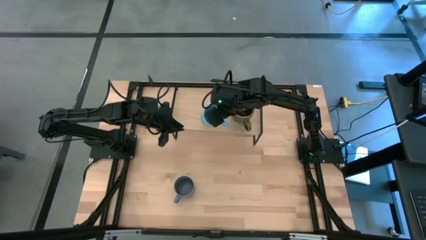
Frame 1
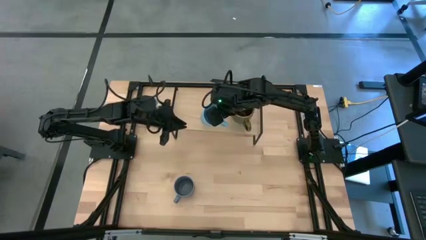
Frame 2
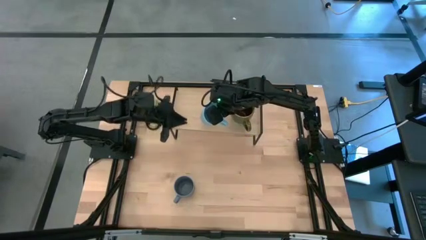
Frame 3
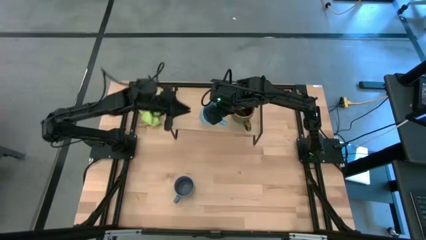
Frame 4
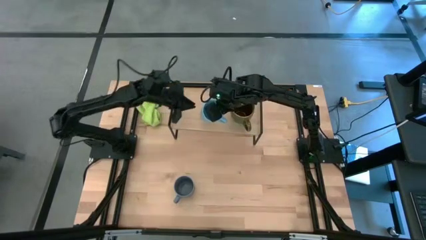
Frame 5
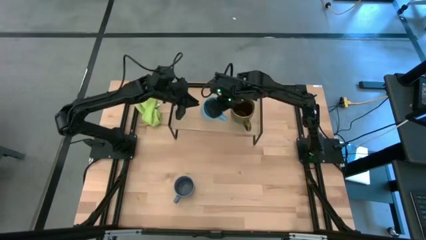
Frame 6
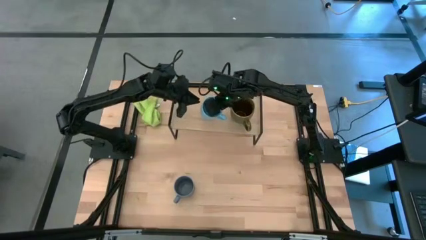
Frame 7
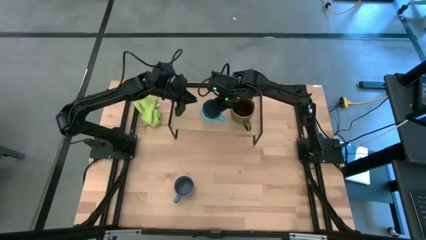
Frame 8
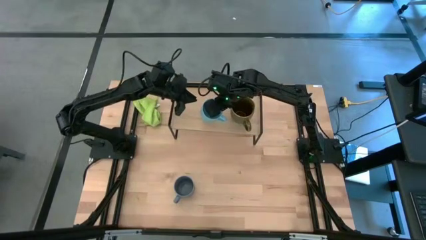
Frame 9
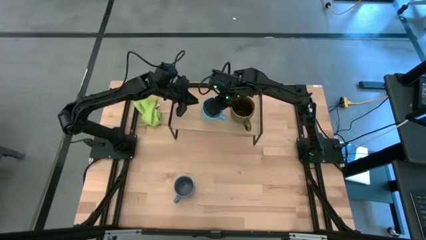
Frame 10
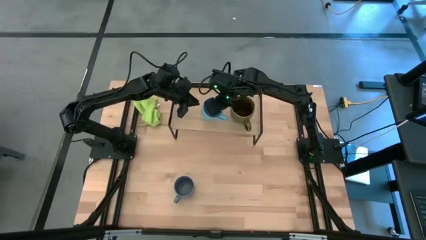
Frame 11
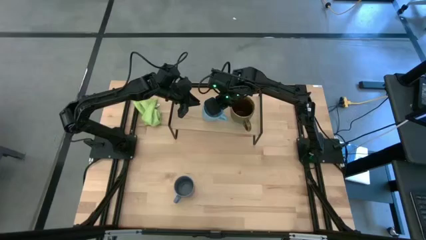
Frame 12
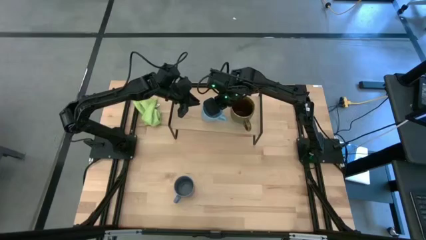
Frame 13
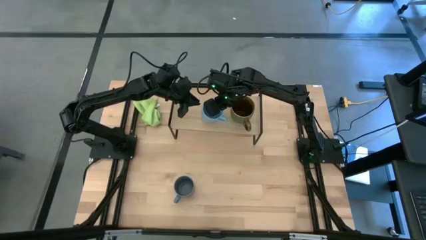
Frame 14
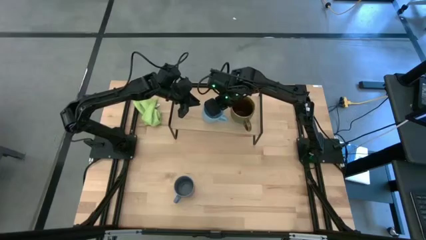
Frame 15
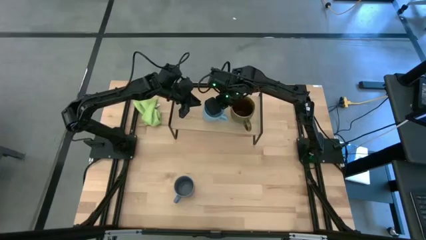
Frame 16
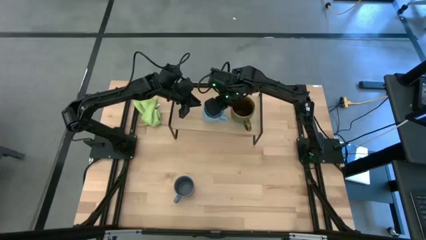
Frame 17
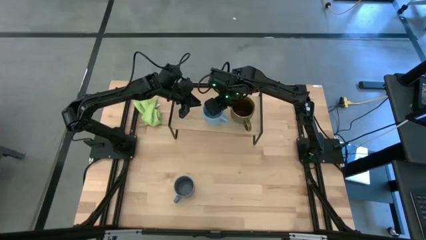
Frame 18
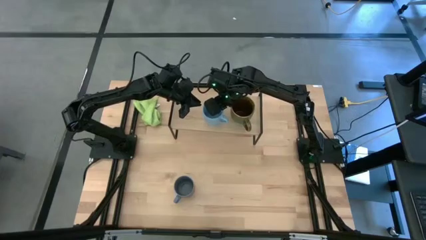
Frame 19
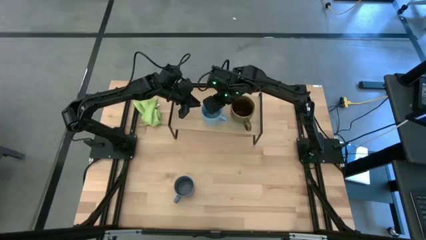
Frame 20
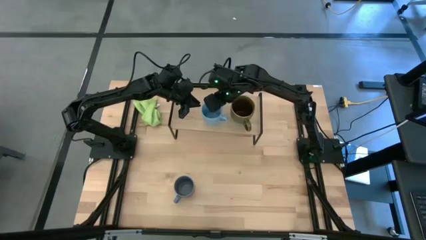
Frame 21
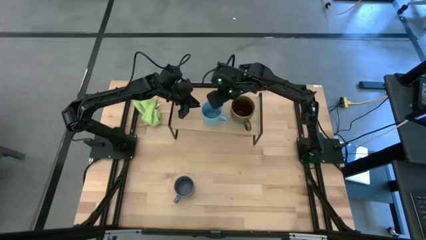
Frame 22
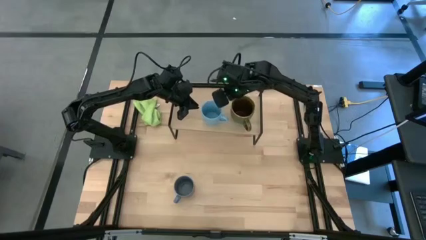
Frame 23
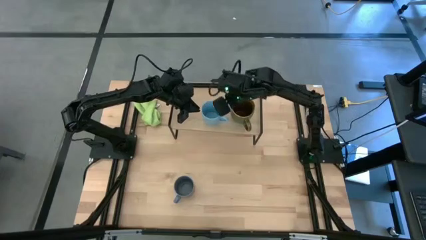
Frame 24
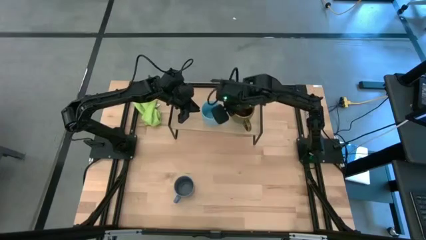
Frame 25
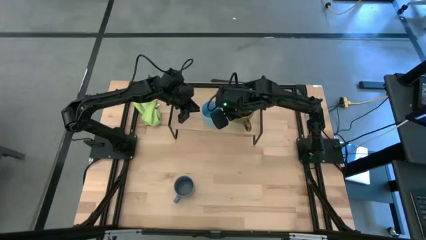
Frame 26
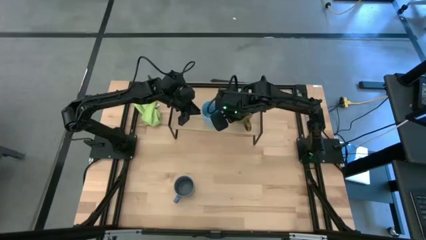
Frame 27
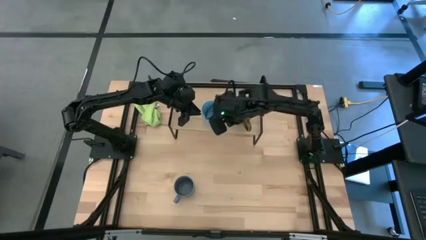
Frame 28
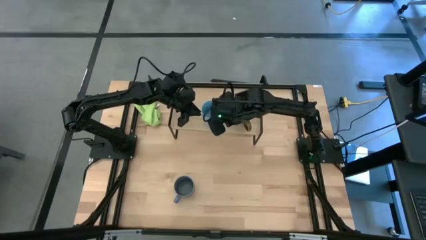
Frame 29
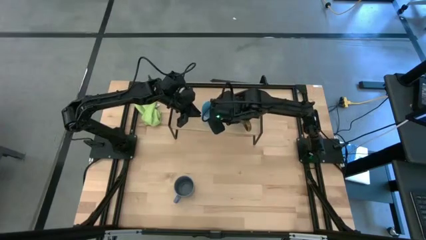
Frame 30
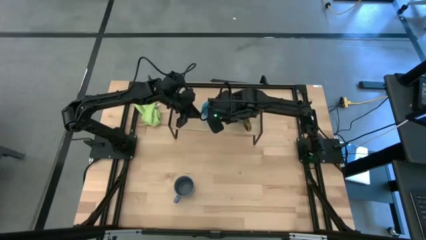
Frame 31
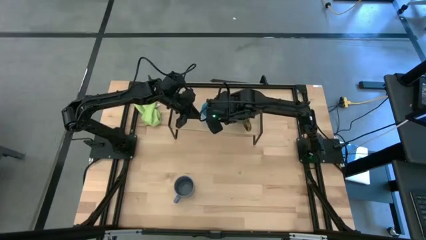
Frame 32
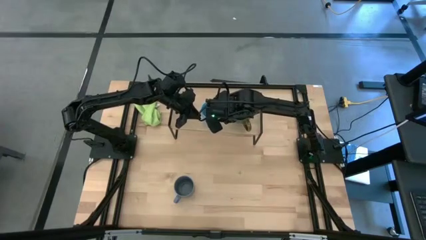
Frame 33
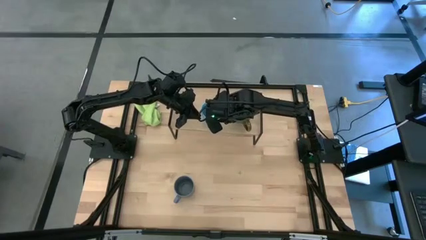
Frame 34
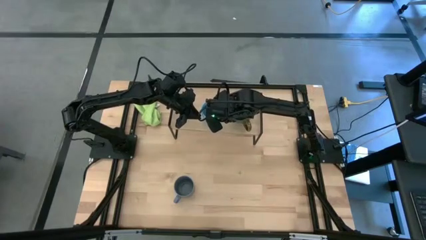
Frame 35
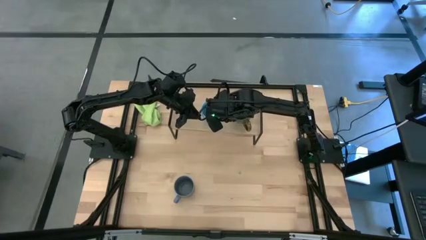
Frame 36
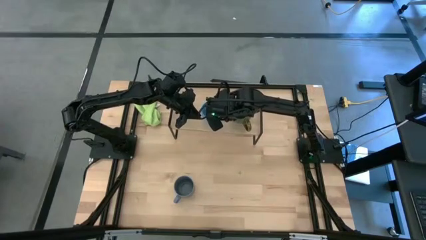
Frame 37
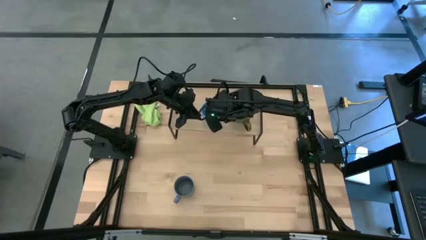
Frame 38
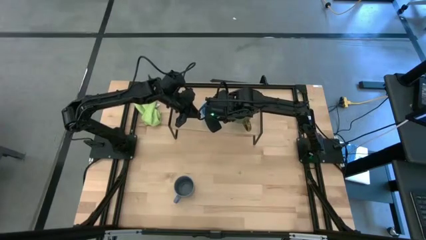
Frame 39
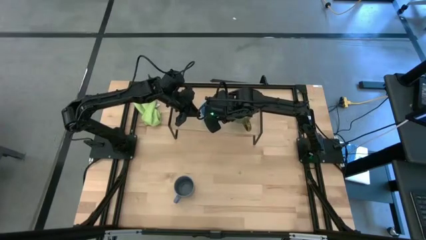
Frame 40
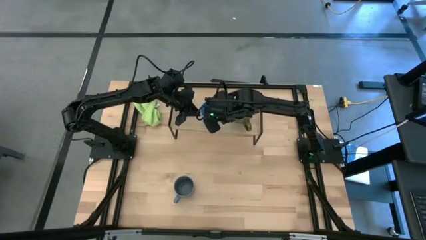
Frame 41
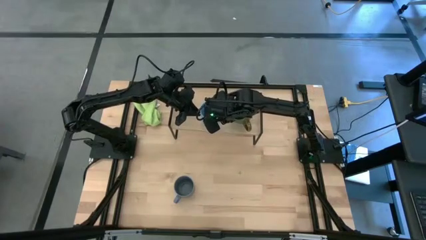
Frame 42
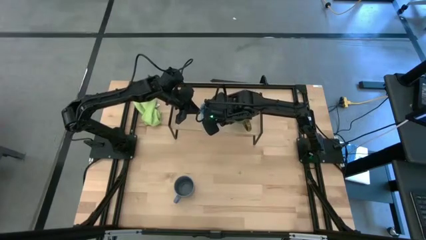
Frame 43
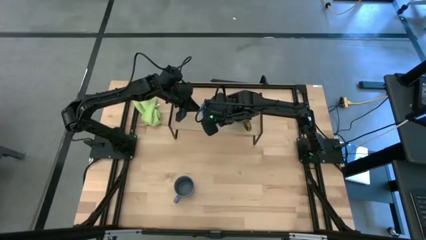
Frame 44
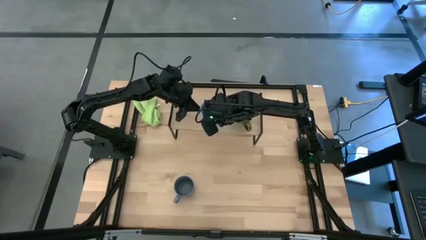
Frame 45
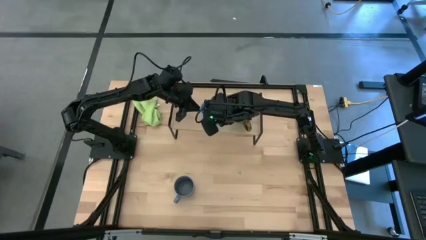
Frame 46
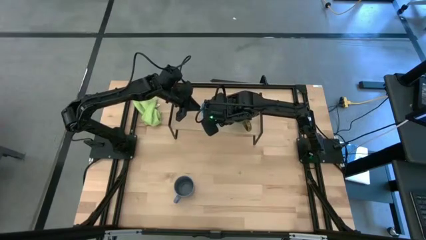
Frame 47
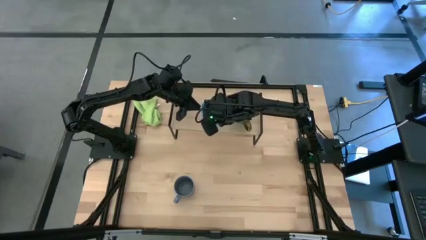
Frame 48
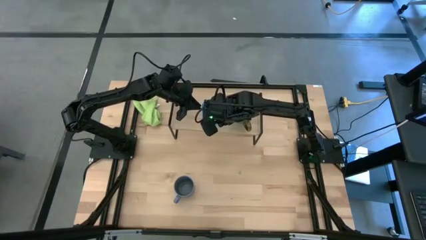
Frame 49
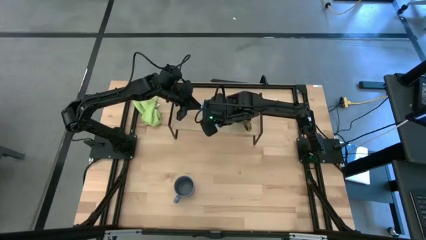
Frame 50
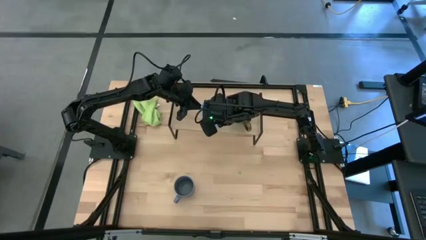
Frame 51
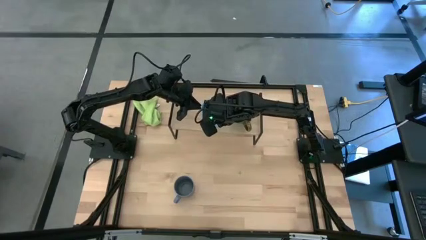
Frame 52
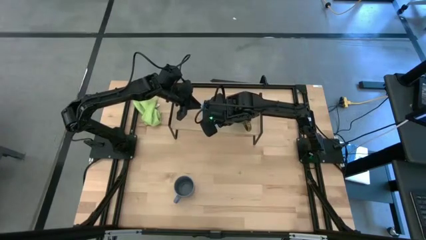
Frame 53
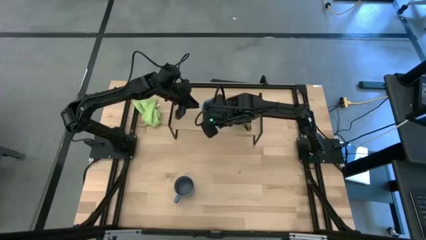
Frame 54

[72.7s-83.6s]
Task: Stack small to large cups/mugs on shelf
Put the blue mug on the shelf

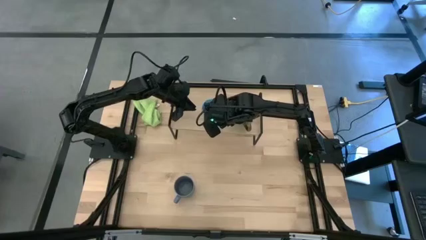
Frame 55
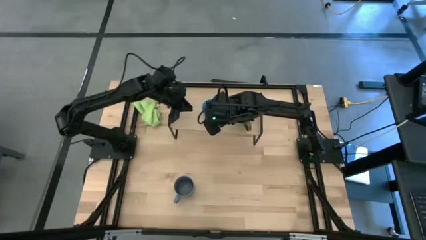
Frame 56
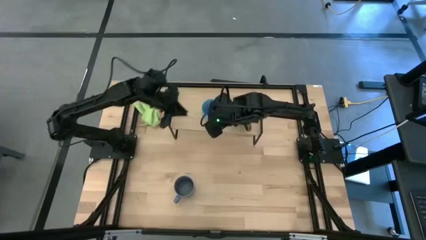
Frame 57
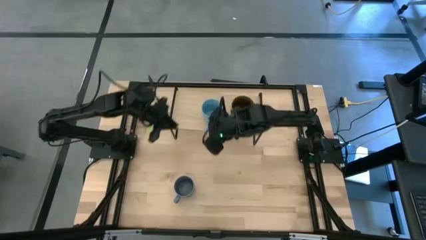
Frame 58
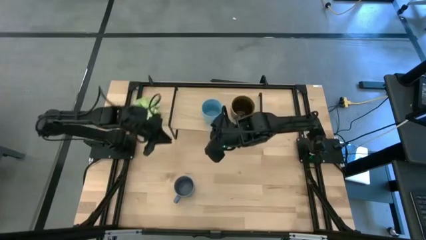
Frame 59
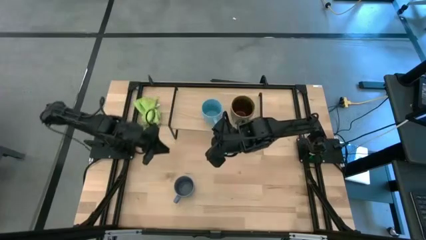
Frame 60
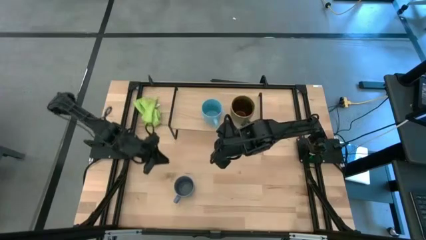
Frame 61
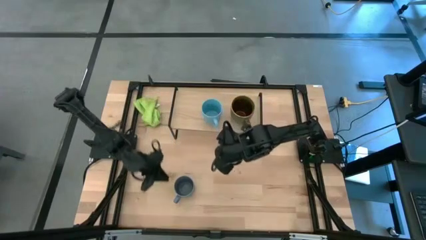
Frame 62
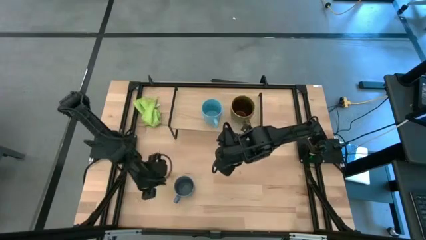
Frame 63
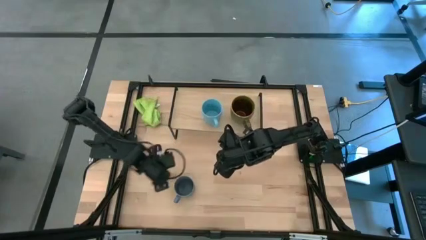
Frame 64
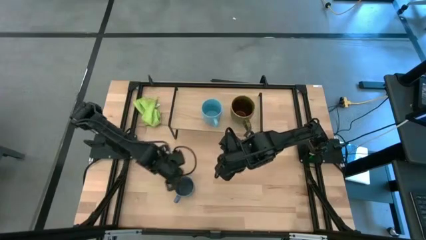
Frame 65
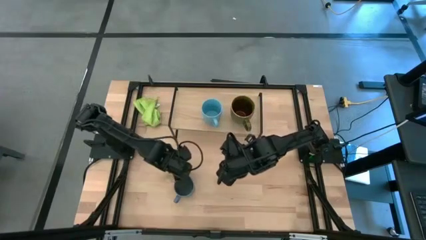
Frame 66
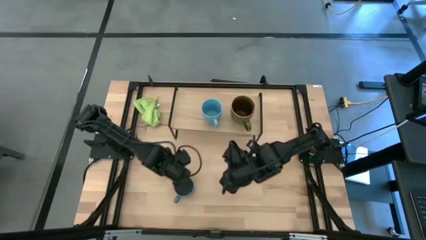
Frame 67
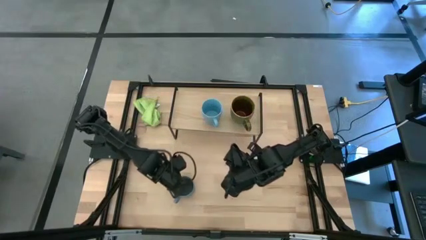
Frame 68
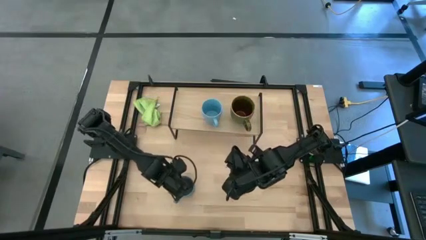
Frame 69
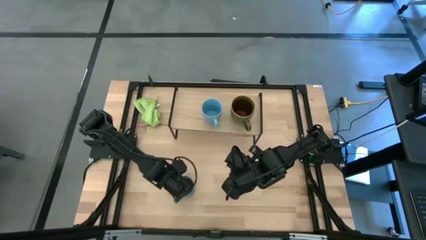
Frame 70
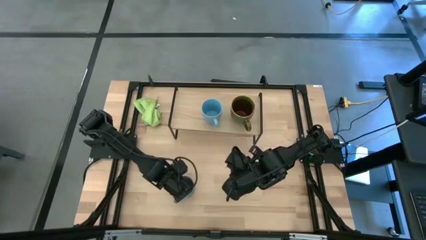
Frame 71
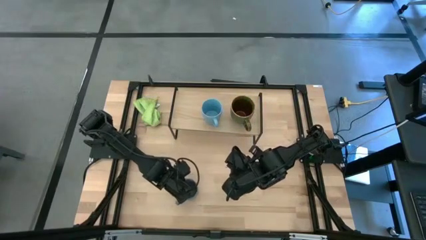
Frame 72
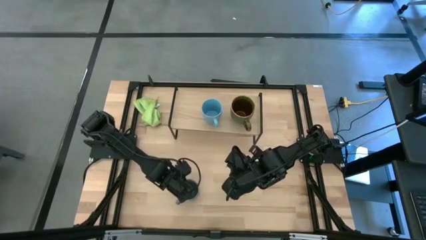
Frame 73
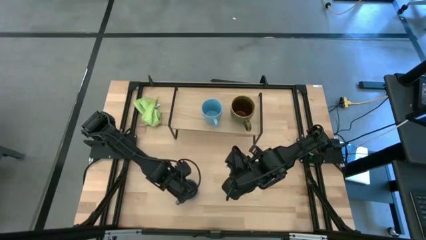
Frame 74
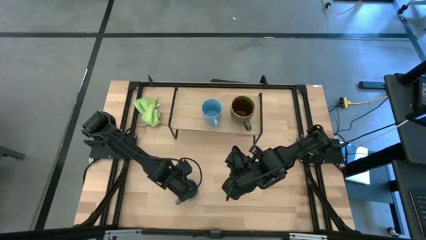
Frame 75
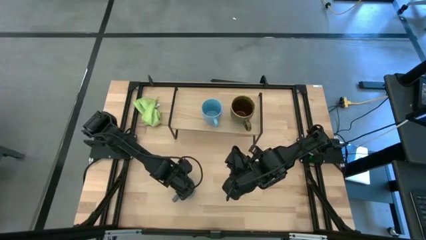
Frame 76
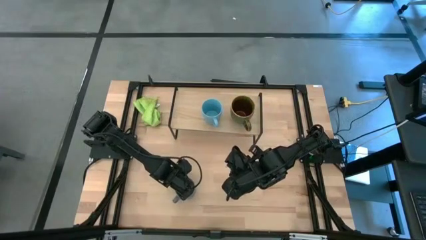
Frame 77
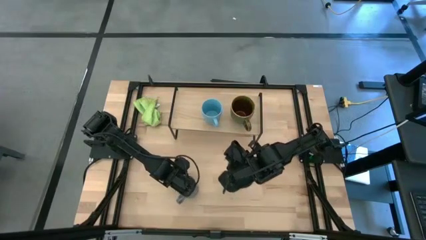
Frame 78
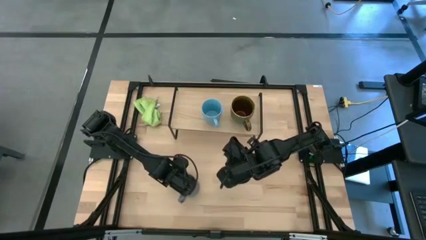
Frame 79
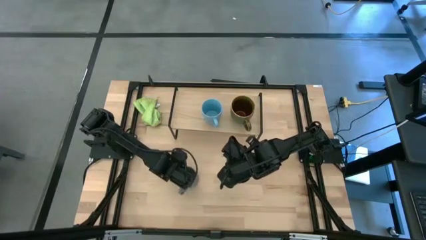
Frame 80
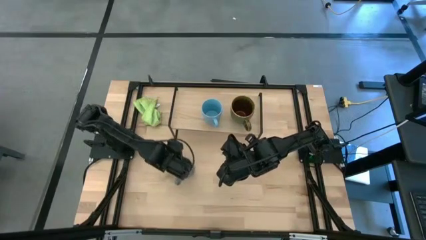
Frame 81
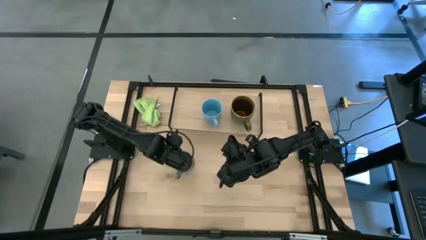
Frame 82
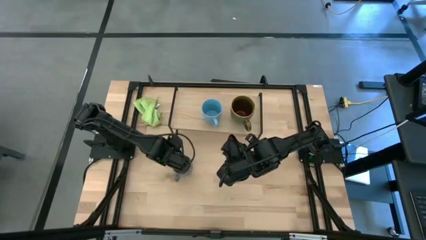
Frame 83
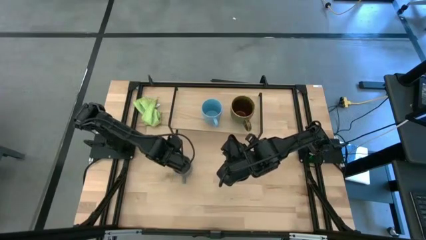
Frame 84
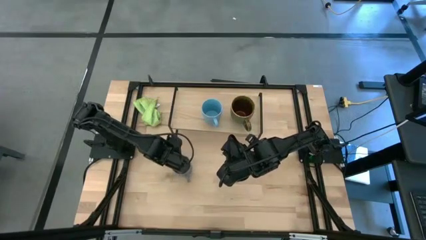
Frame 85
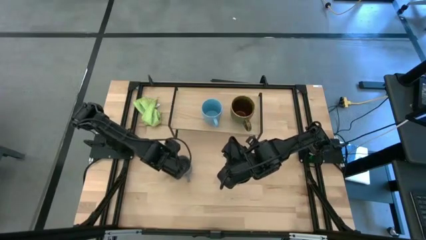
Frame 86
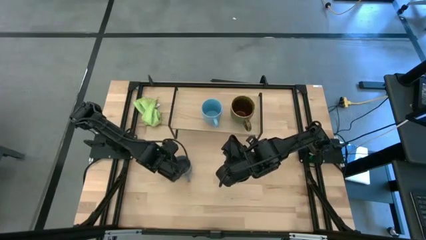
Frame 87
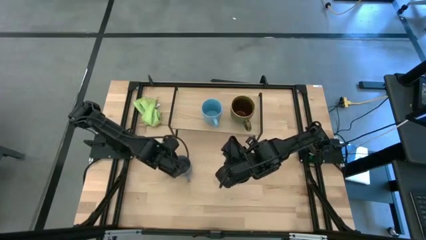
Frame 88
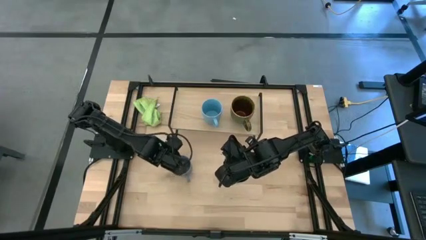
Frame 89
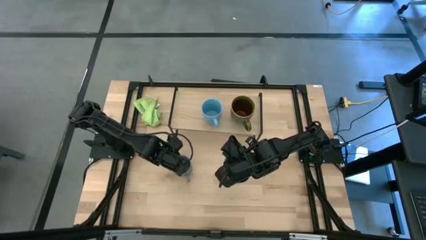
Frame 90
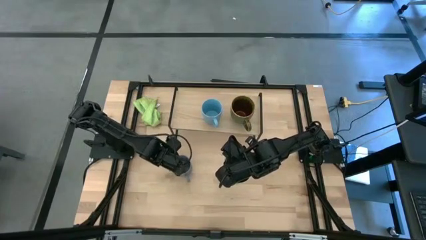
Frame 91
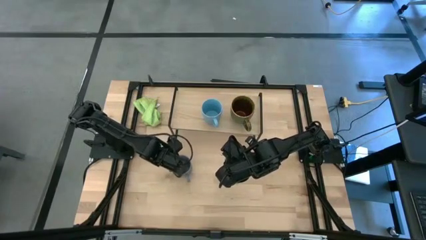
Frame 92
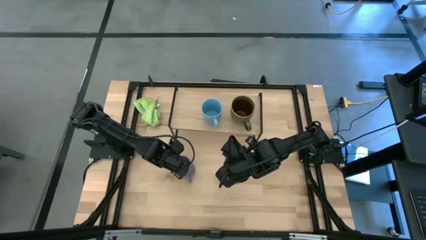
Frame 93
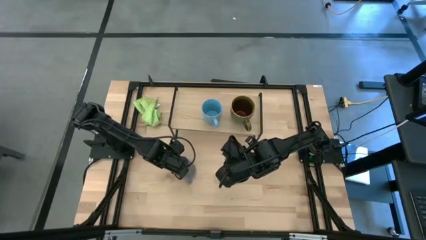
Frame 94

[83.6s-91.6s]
Put the gray mug on the shelf
